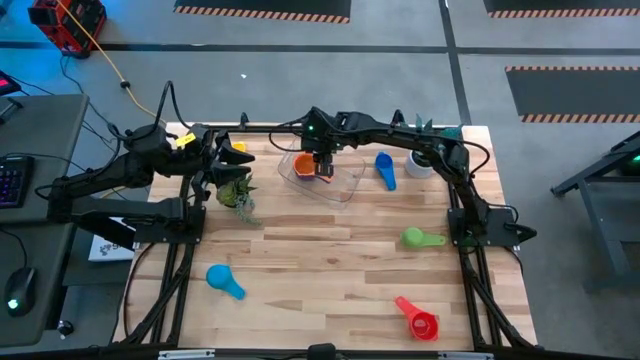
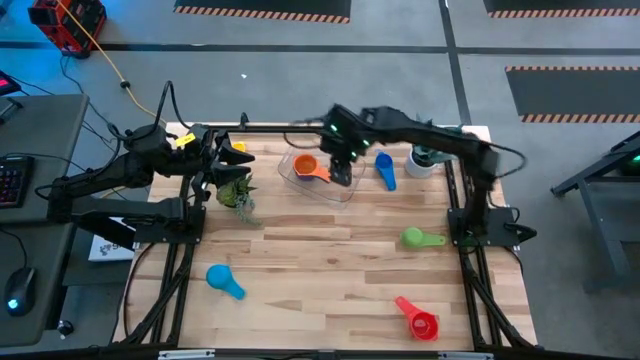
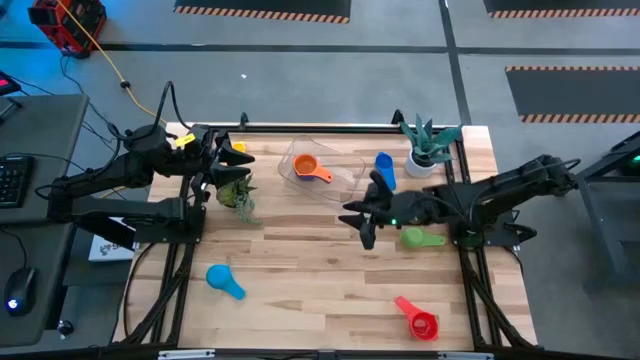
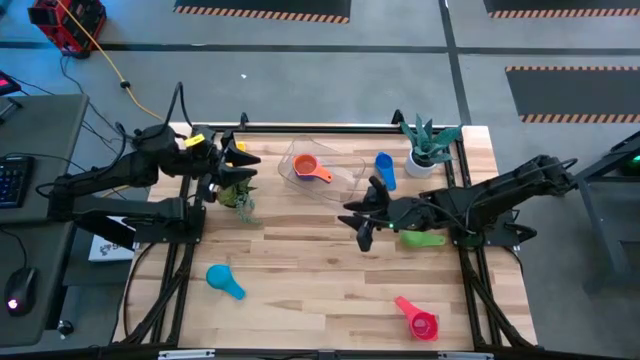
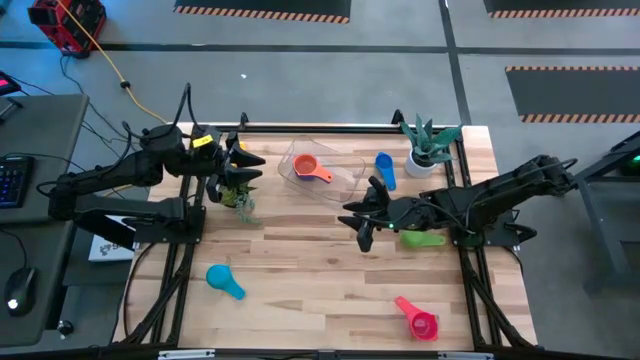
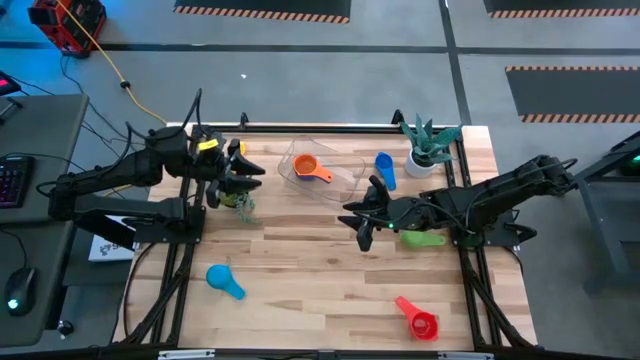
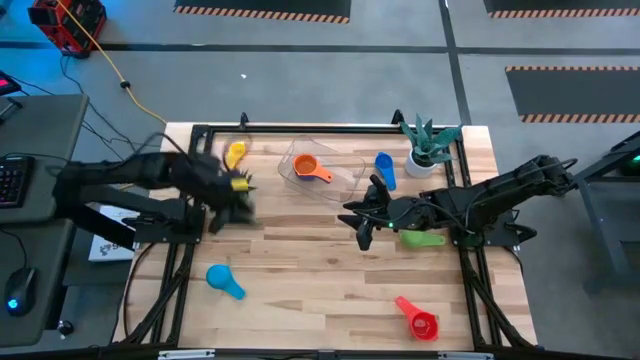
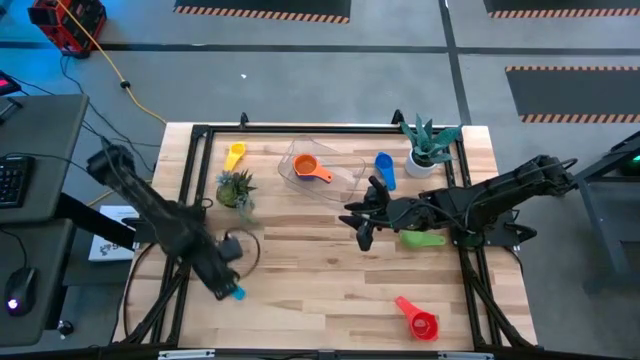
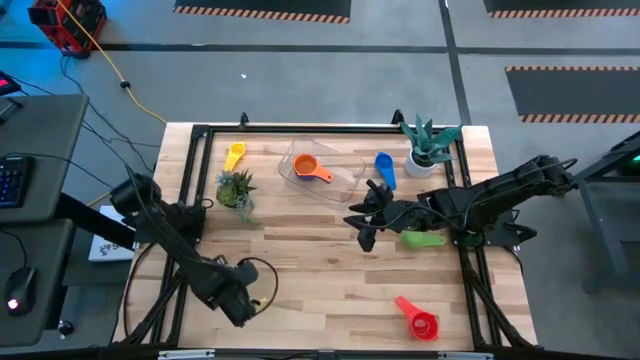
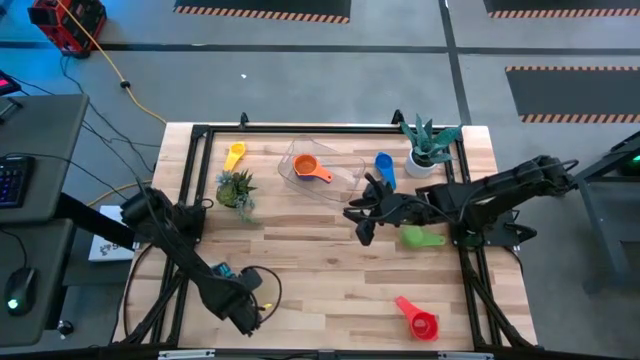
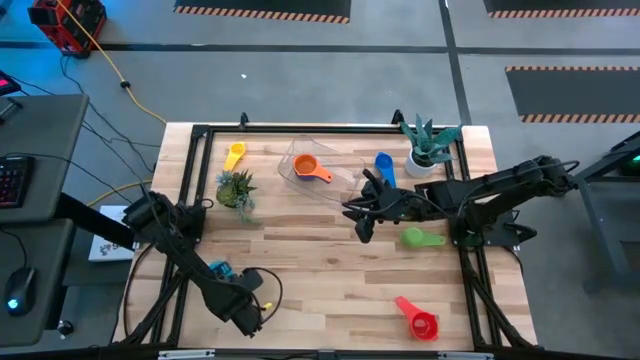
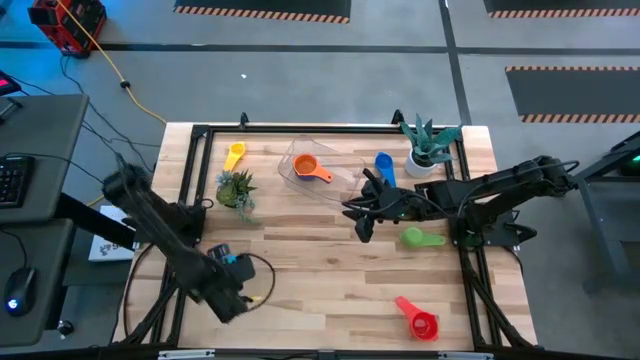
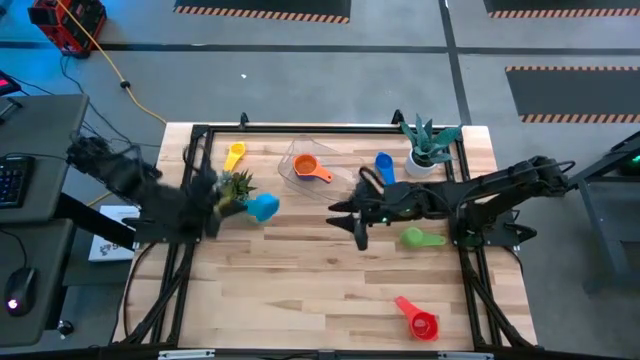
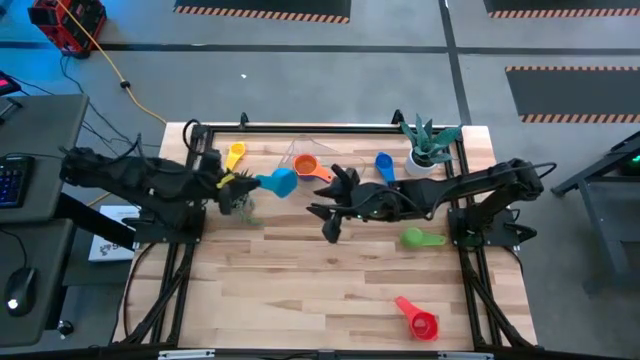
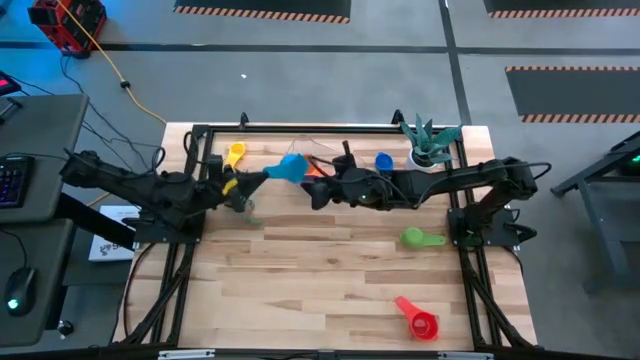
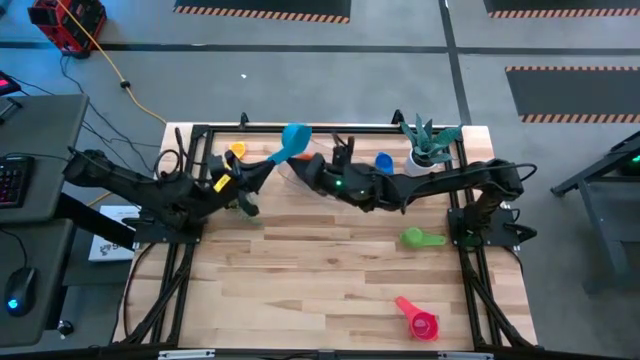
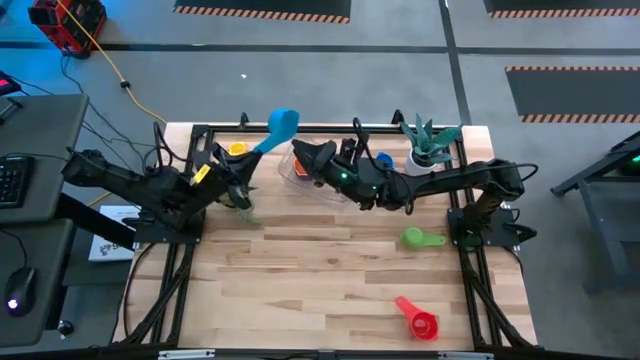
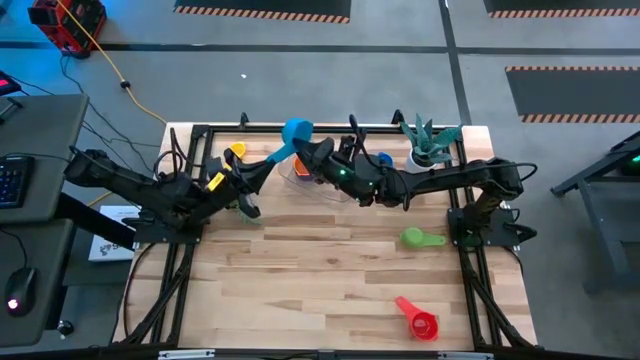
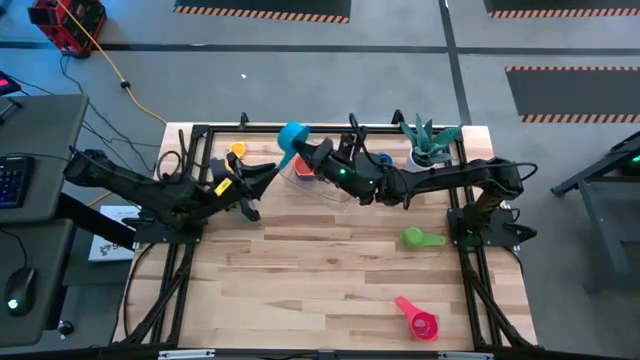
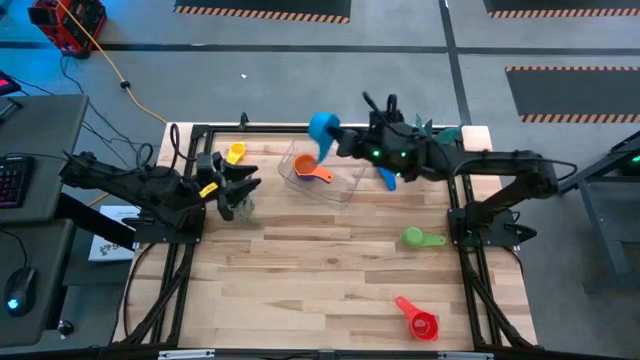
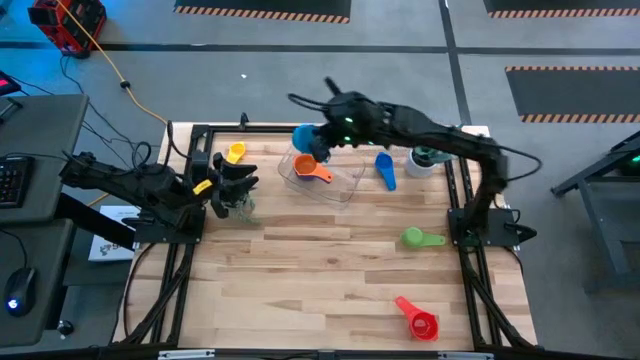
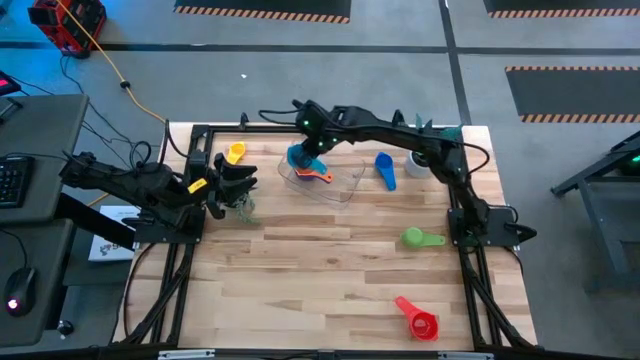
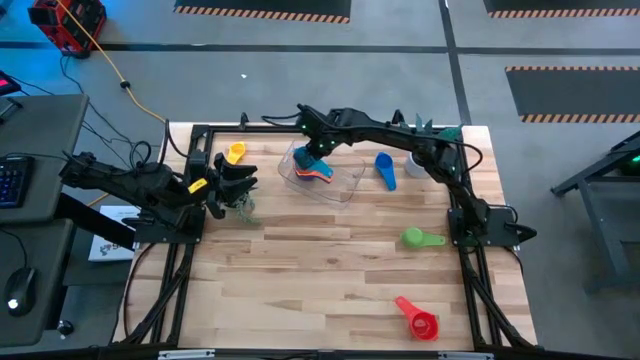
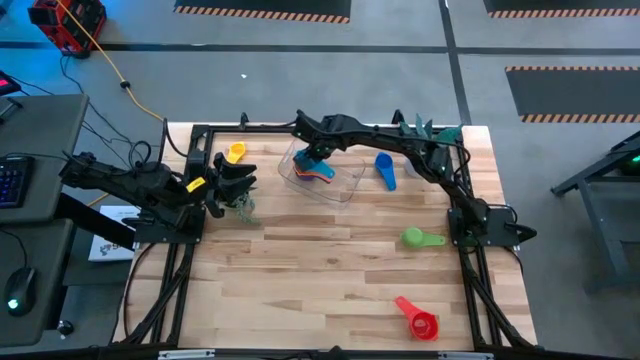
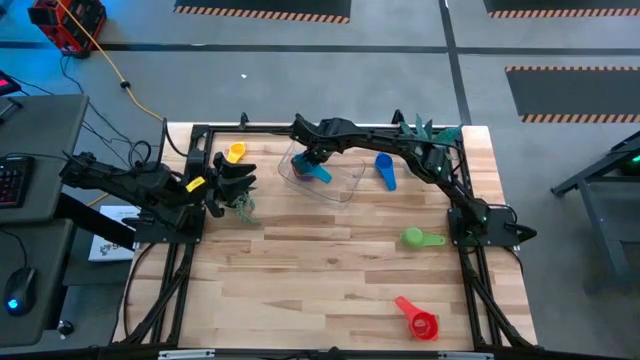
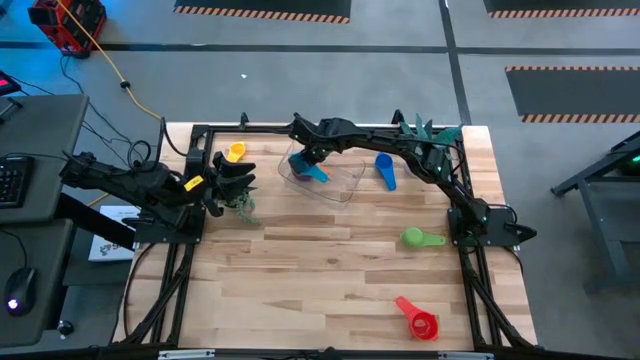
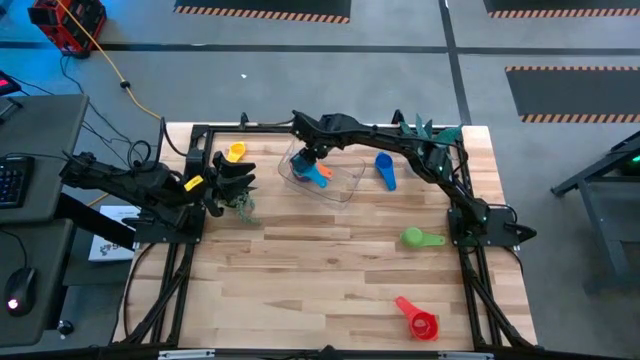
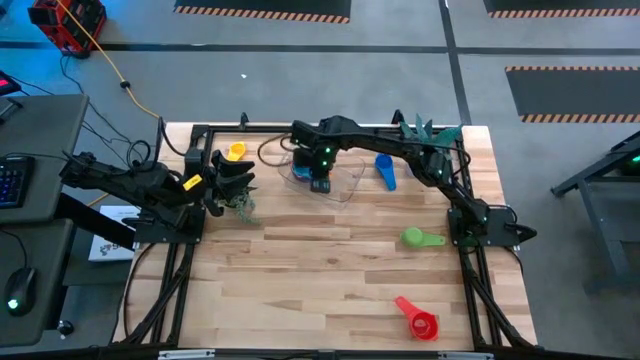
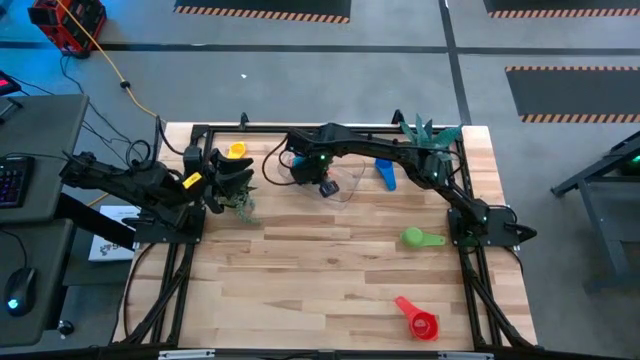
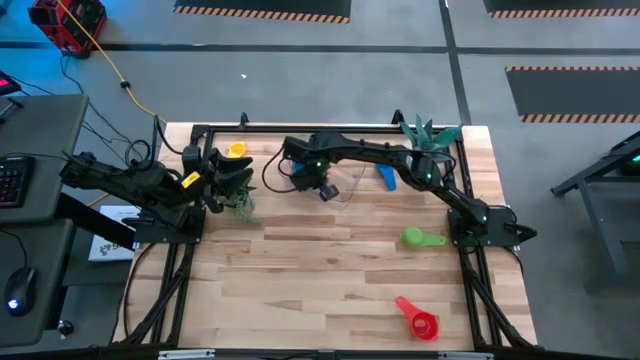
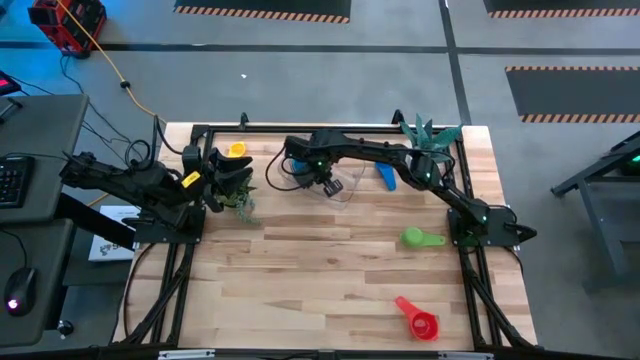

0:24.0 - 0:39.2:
Task: Nest measuring cups in basket
Stack the light blue measuring cup on top of the orange measuring cup on the transparent bin
